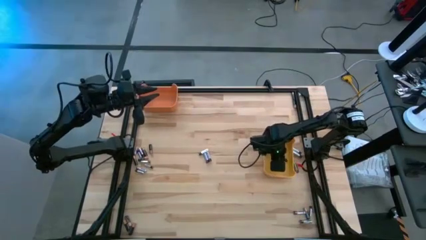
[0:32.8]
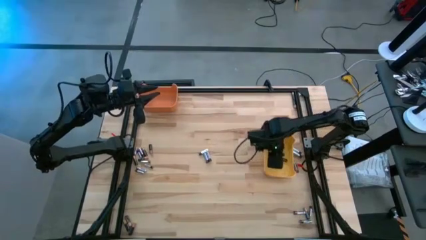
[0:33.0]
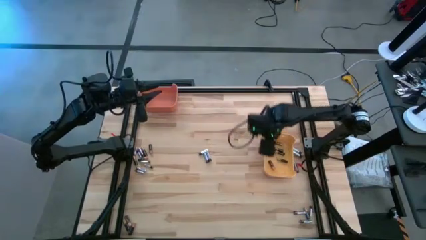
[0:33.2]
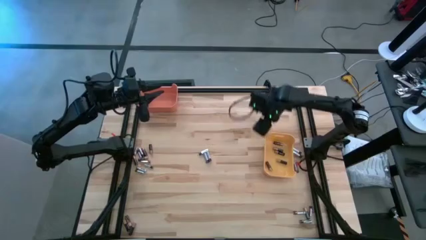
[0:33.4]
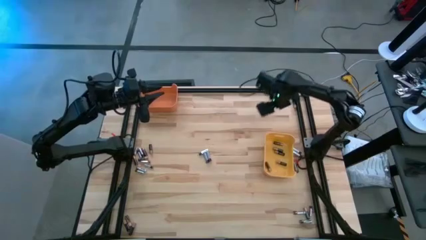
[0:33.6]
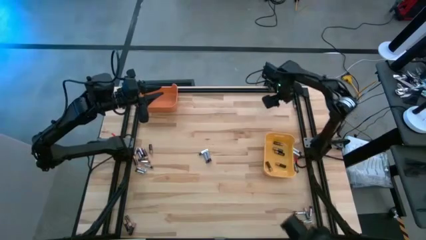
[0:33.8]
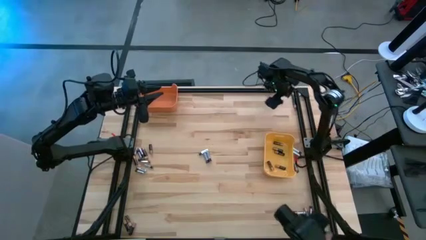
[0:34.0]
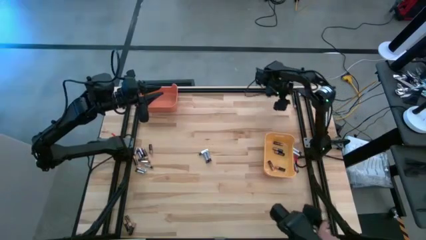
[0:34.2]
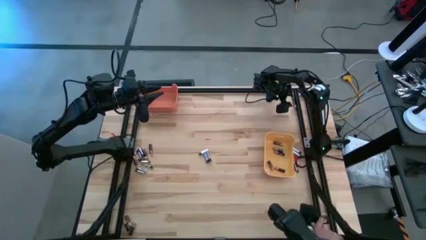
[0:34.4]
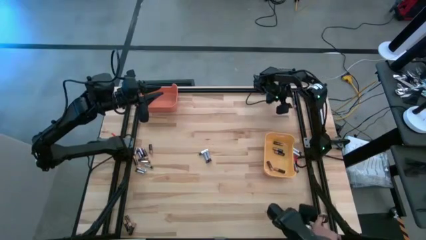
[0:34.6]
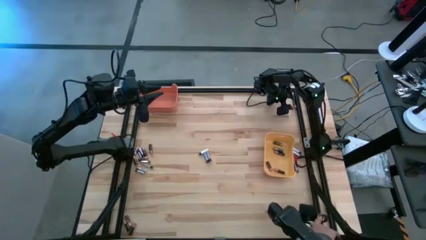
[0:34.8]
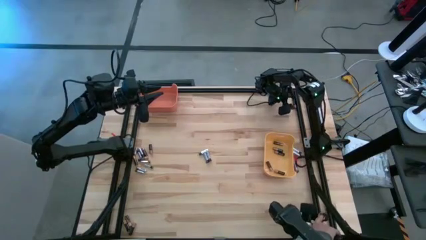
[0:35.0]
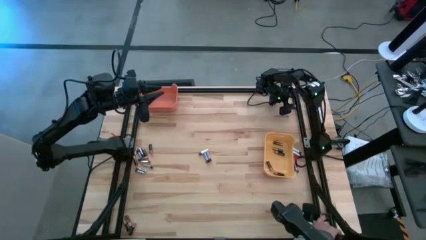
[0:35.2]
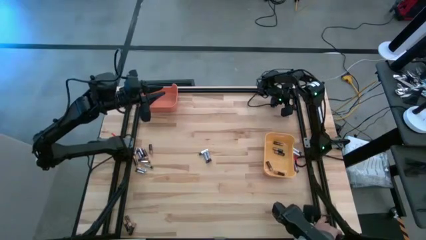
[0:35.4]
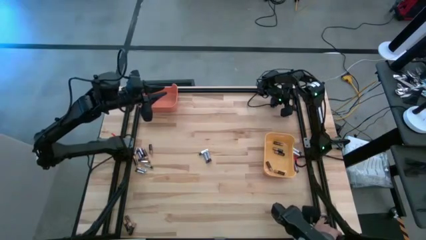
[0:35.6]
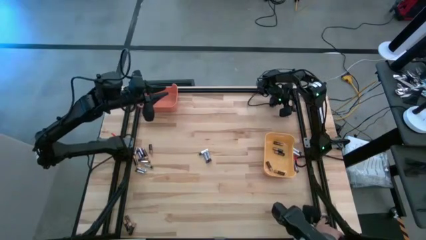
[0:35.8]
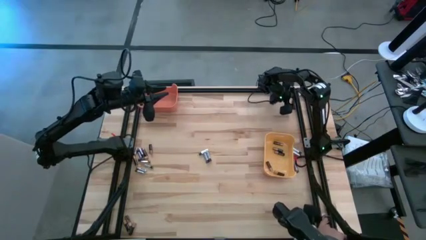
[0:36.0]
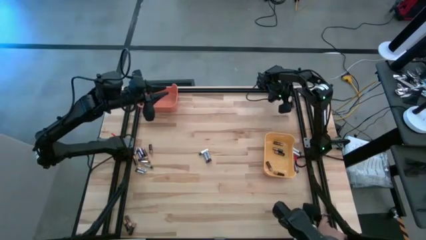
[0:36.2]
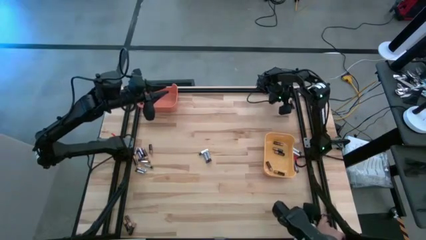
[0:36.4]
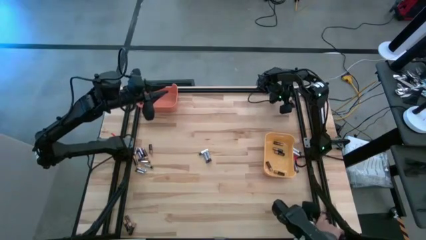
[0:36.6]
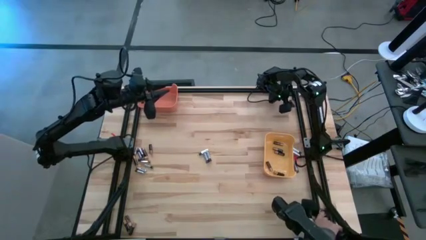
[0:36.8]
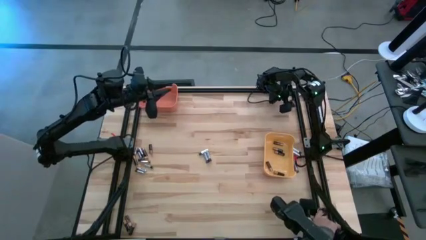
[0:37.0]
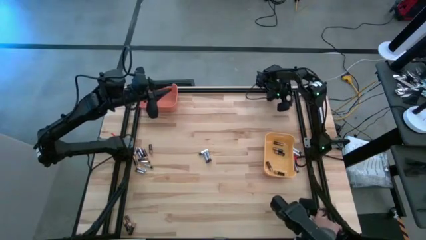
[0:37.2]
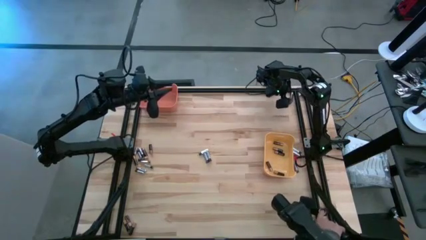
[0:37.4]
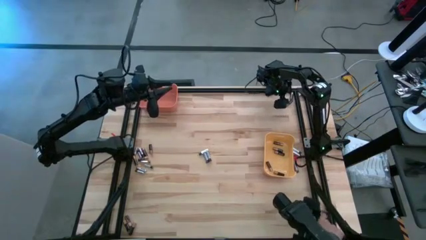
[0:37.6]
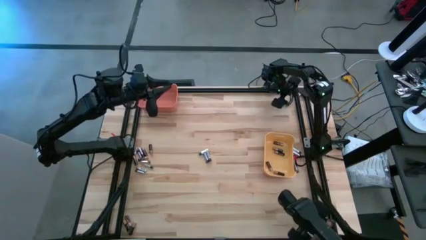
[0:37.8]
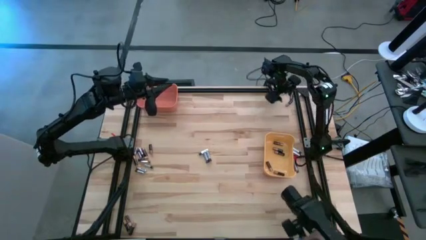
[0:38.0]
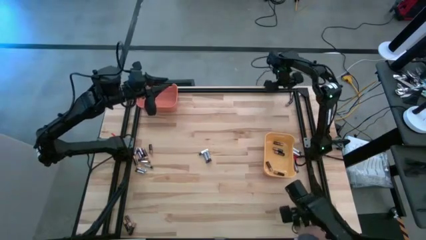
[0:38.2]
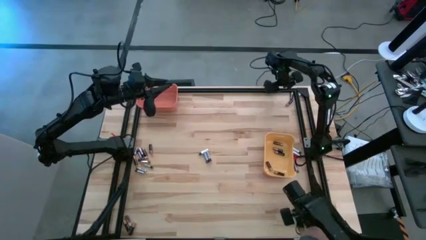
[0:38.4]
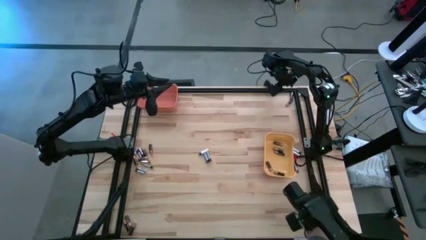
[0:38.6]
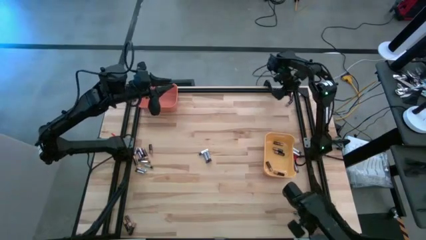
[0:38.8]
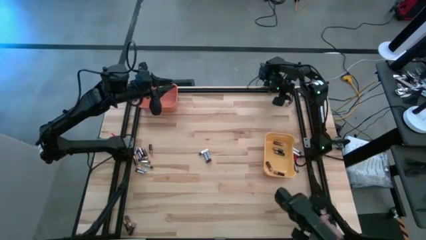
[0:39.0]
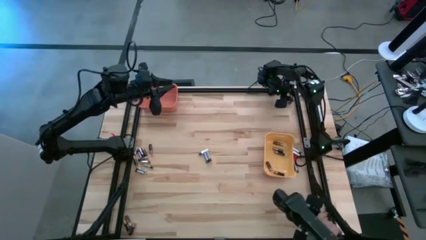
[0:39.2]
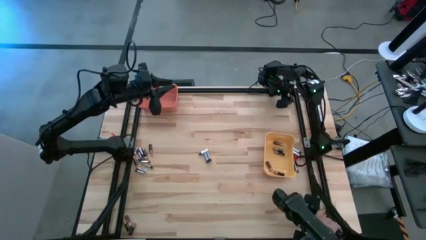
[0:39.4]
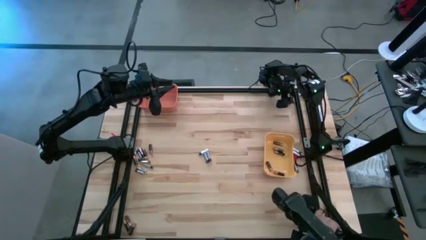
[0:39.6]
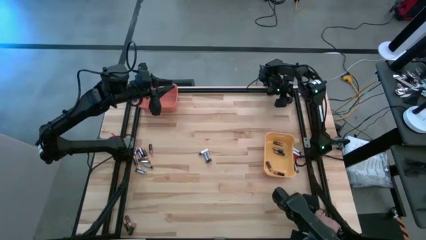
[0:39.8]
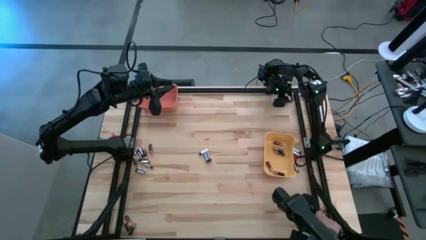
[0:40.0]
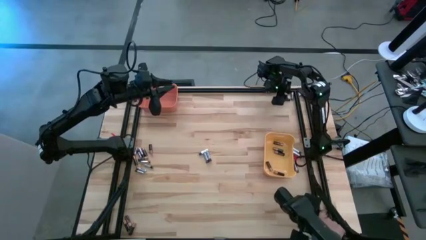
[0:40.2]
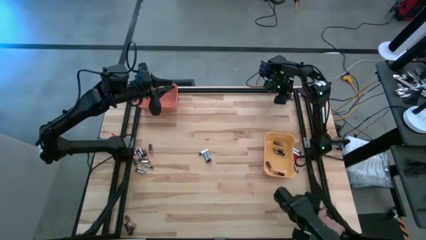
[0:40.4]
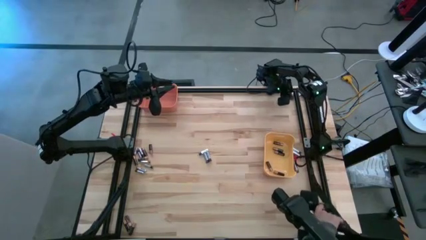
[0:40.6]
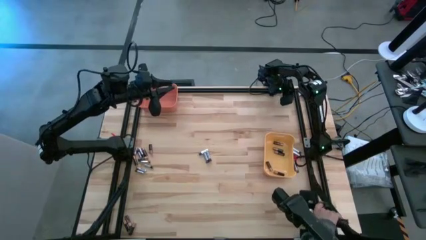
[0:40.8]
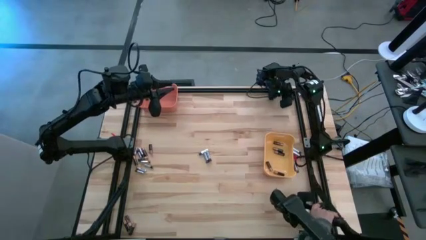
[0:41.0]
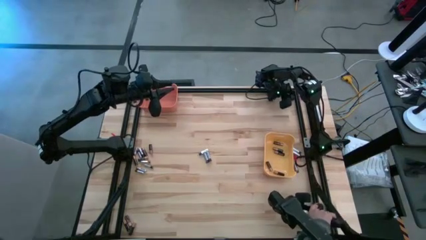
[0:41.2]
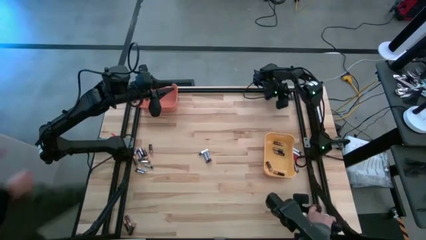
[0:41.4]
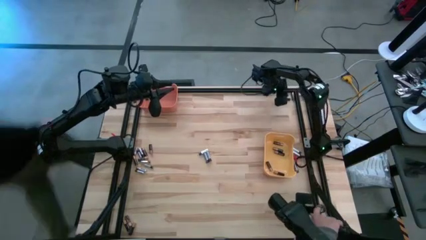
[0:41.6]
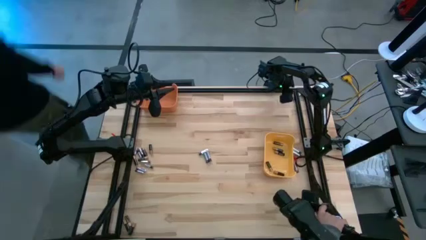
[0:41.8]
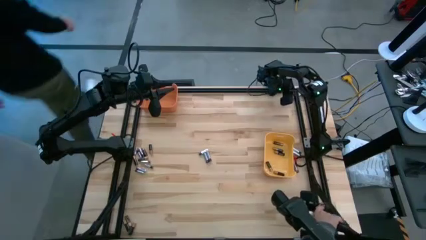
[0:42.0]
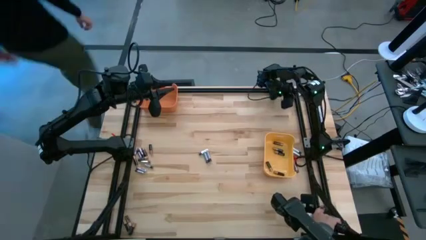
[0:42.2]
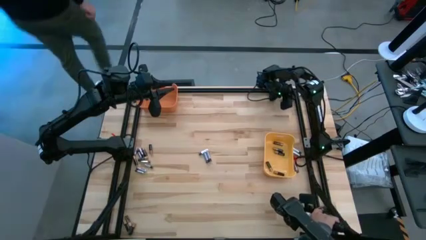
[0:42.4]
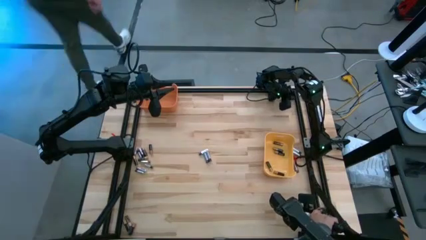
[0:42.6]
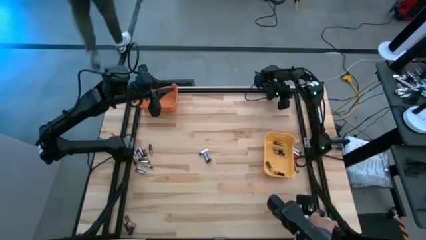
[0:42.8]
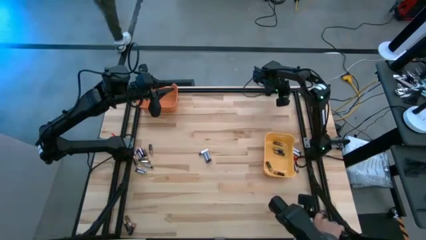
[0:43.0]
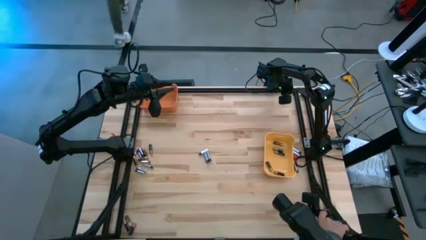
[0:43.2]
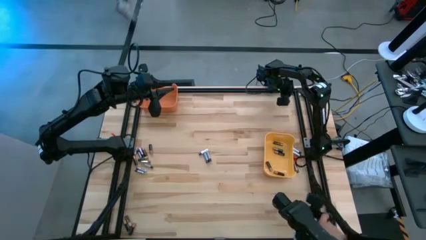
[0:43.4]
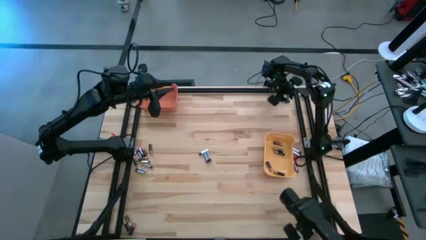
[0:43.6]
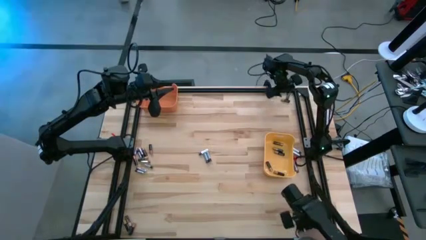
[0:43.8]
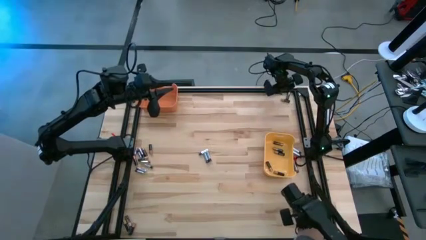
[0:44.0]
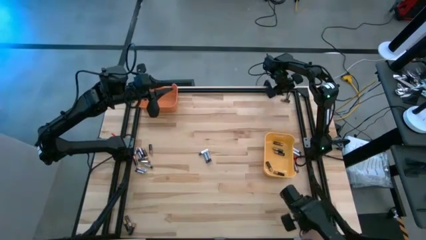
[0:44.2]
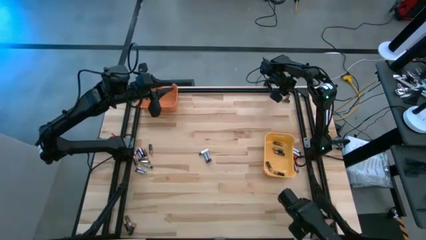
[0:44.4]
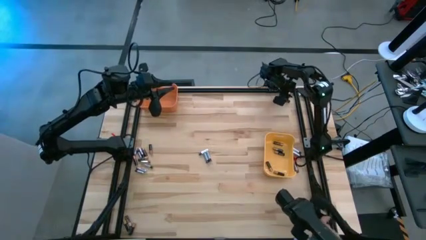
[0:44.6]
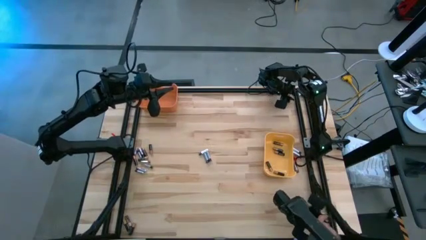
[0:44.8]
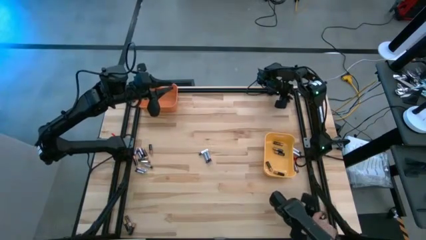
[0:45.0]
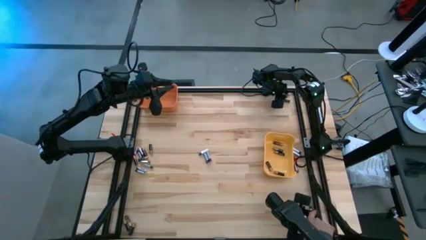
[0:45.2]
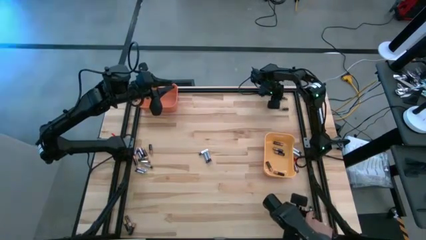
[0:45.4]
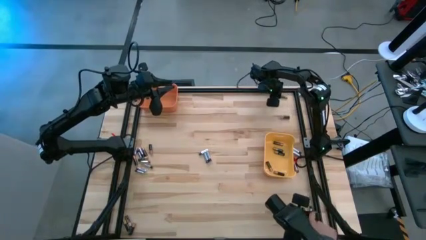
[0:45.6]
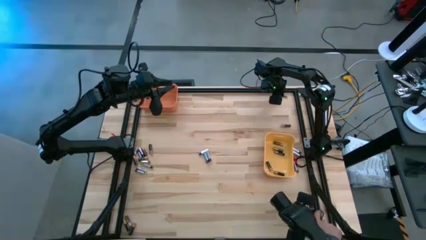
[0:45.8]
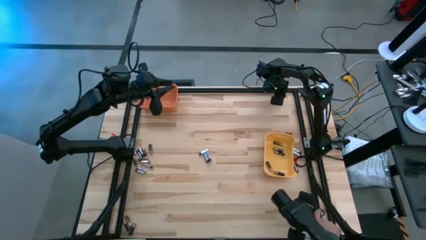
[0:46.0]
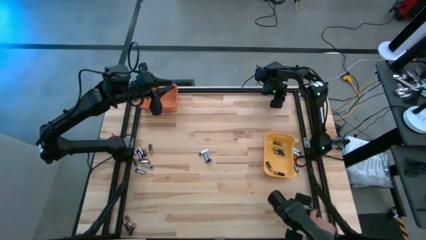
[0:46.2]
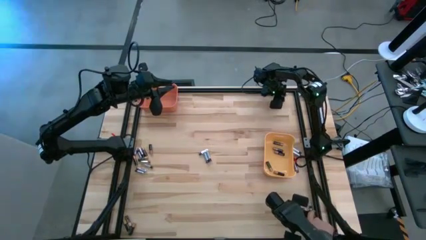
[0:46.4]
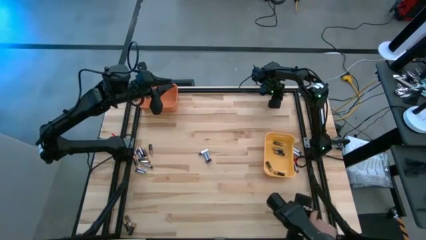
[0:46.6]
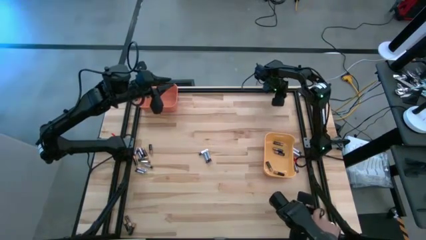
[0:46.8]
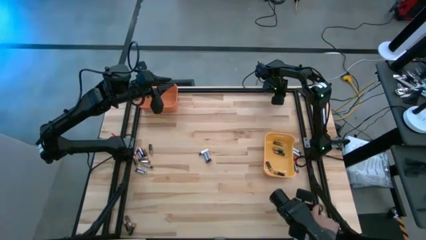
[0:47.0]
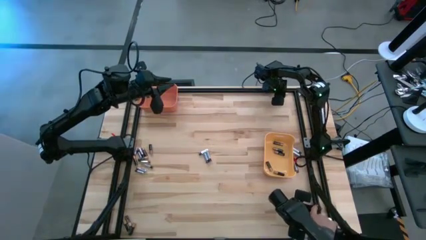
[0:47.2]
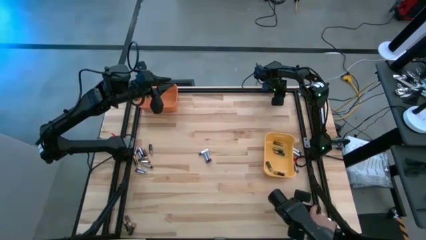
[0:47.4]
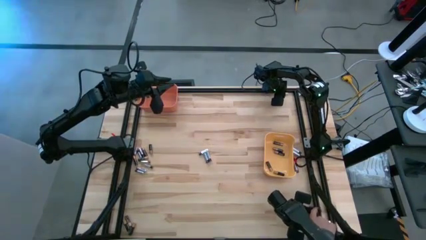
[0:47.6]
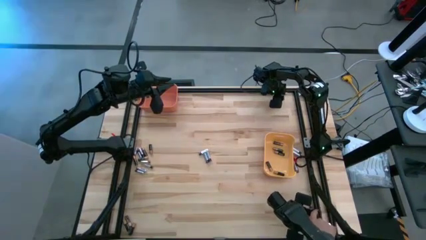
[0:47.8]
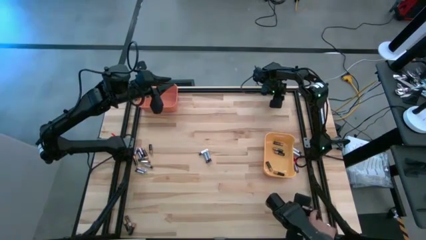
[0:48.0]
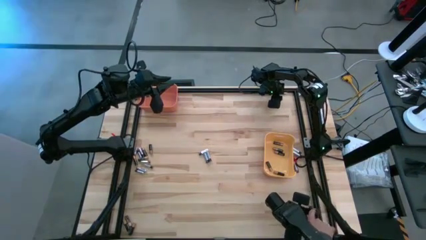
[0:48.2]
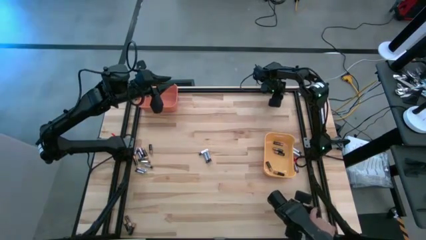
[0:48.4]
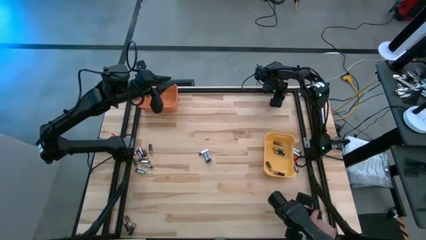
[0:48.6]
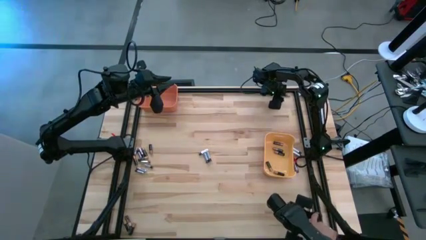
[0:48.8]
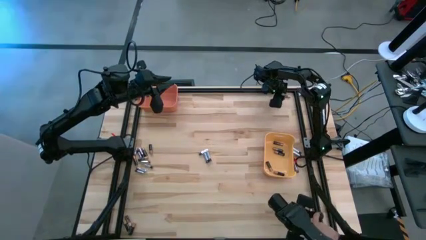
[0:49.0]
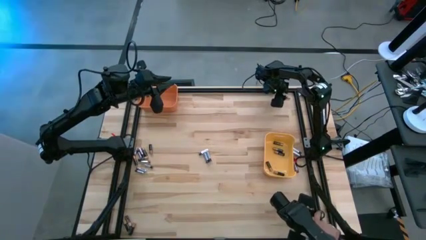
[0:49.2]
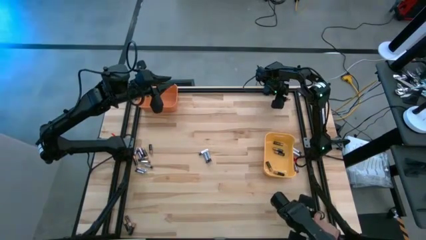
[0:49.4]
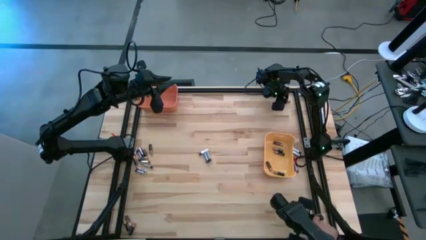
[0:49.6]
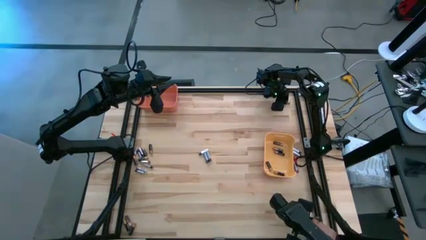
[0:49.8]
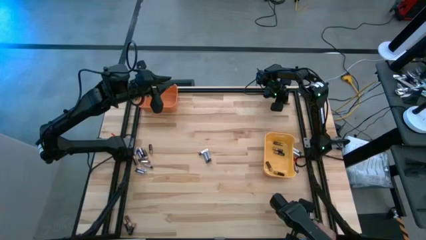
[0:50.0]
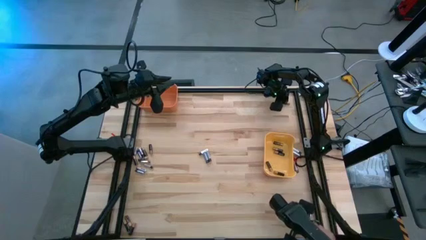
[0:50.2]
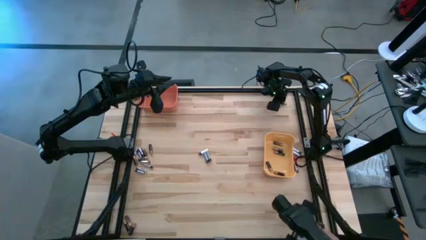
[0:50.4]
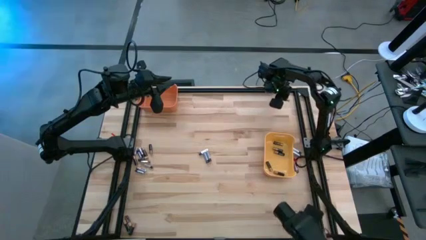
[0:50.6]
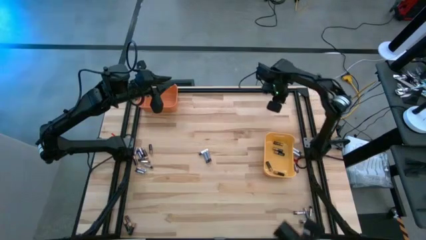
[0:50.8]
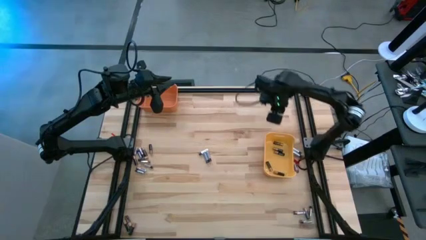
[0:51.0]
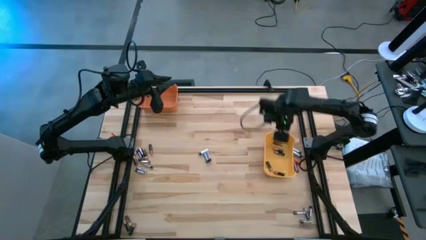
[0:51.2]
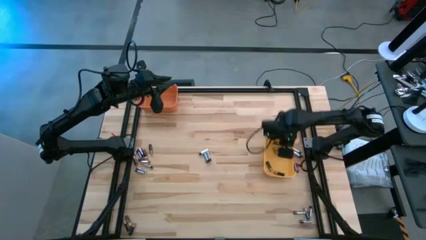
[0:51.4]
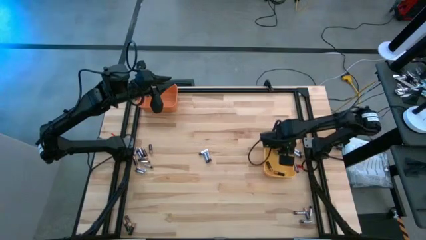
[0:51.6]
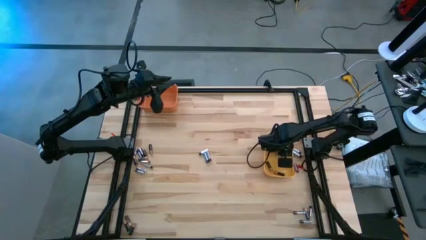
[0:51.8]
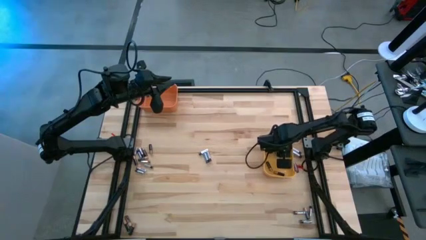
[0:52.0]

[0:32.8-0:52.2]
Task: Sort batteries
Put the black battery into the yellow bin
